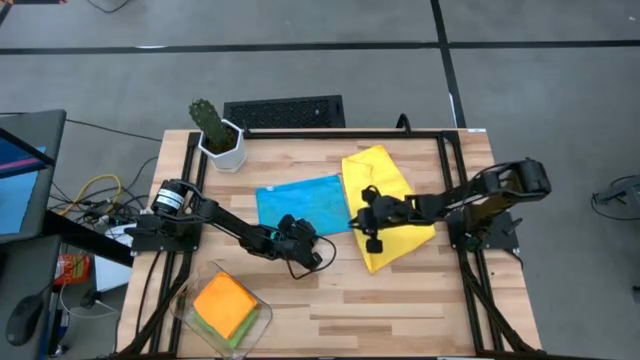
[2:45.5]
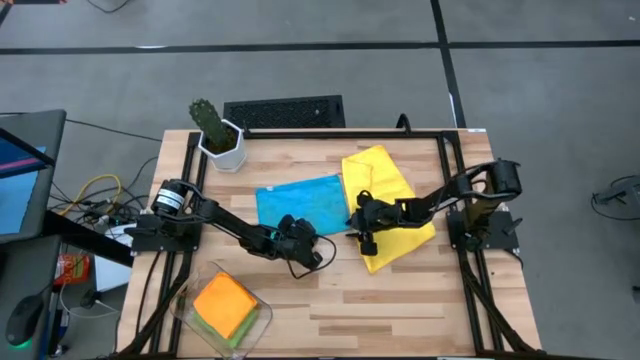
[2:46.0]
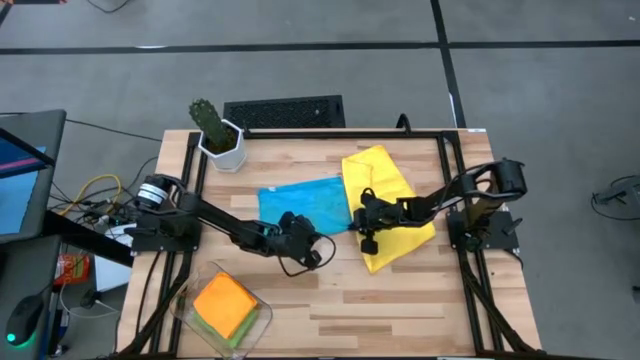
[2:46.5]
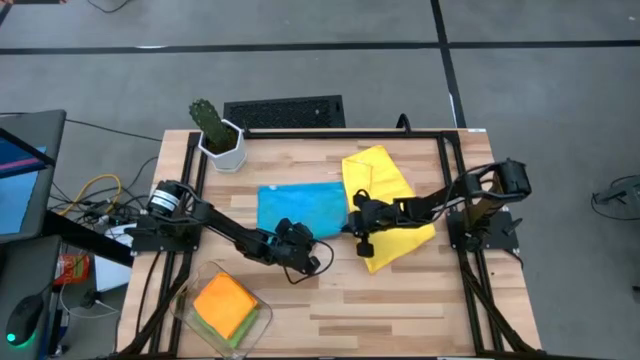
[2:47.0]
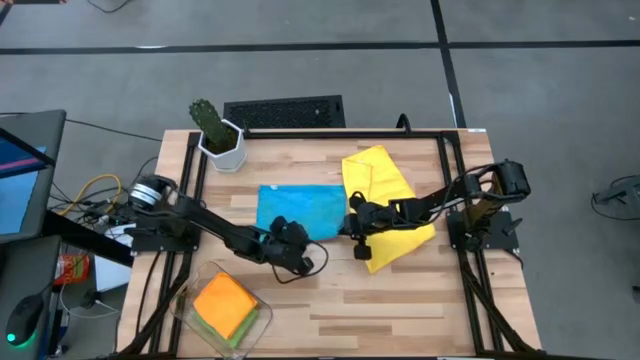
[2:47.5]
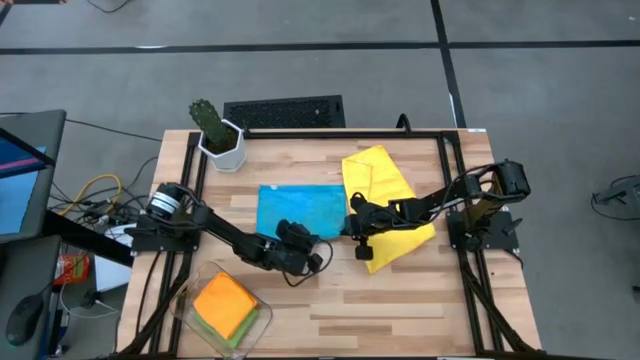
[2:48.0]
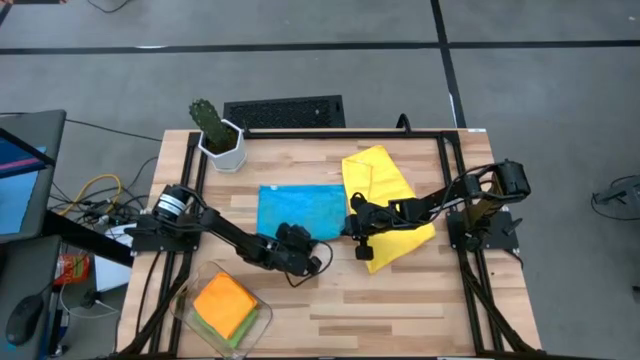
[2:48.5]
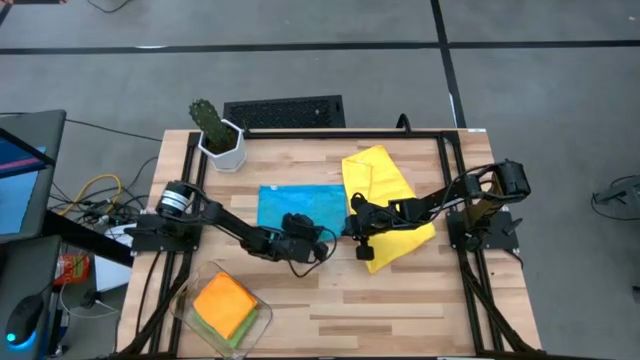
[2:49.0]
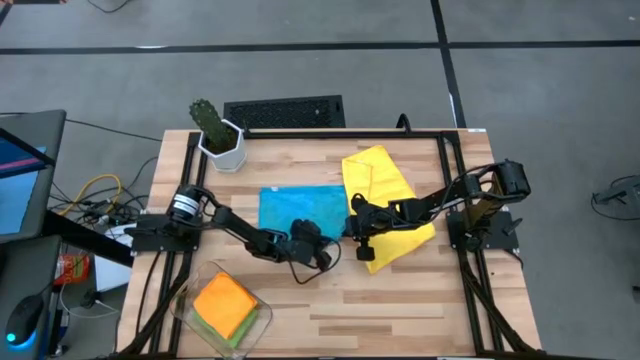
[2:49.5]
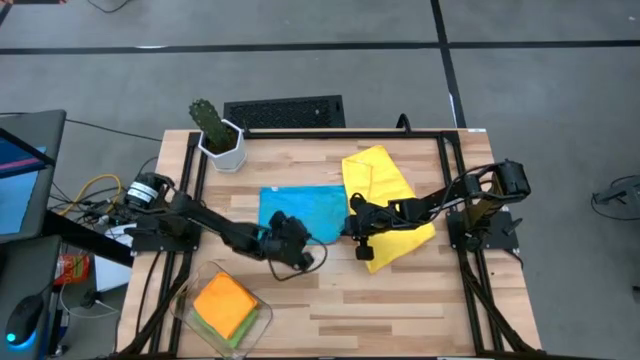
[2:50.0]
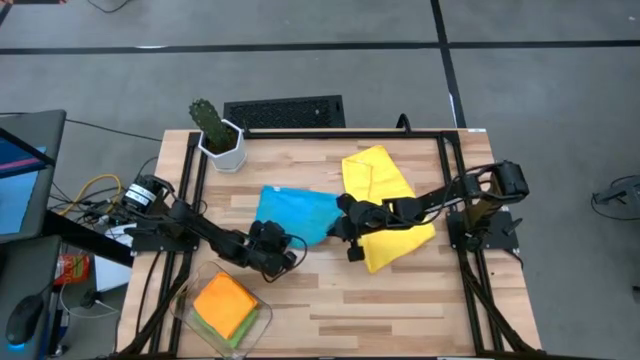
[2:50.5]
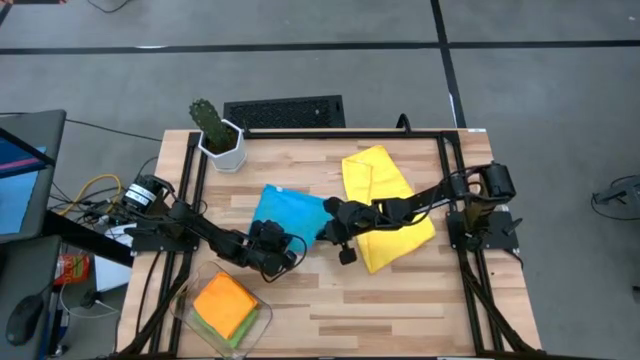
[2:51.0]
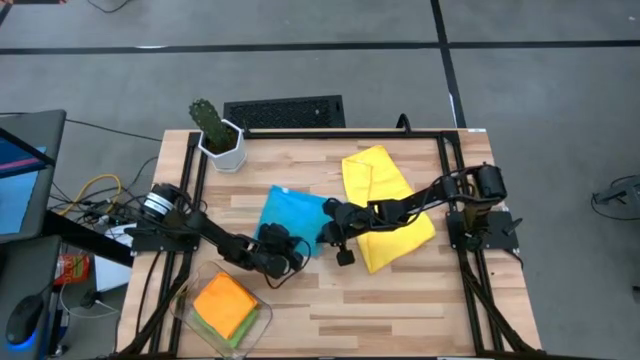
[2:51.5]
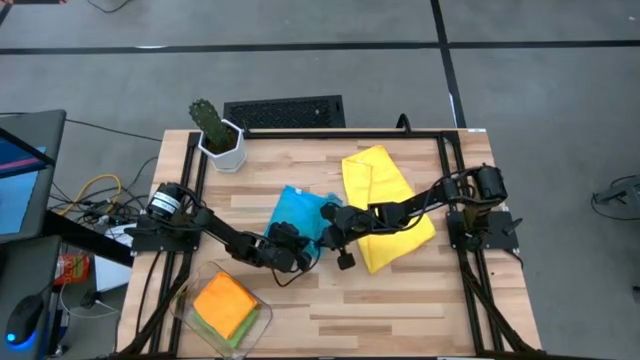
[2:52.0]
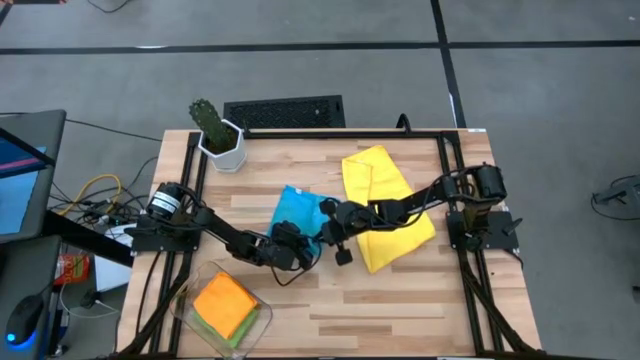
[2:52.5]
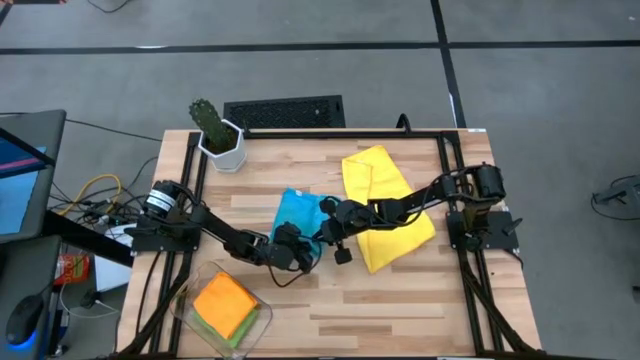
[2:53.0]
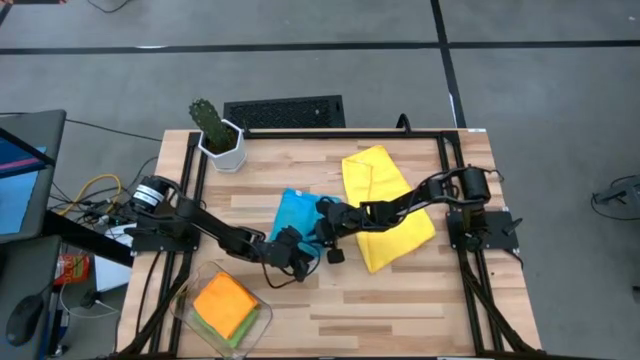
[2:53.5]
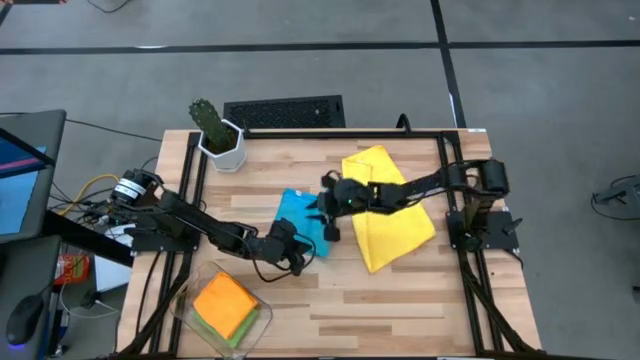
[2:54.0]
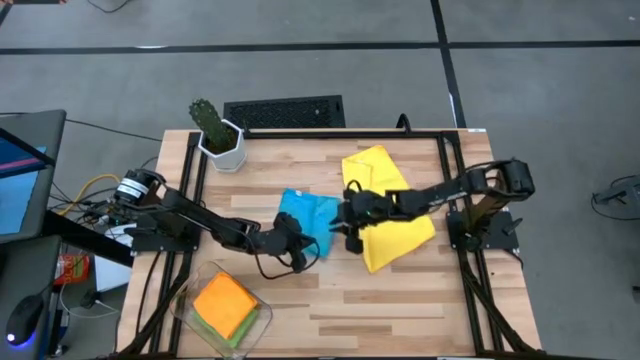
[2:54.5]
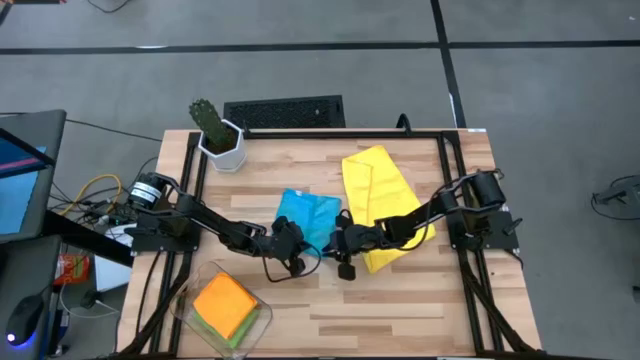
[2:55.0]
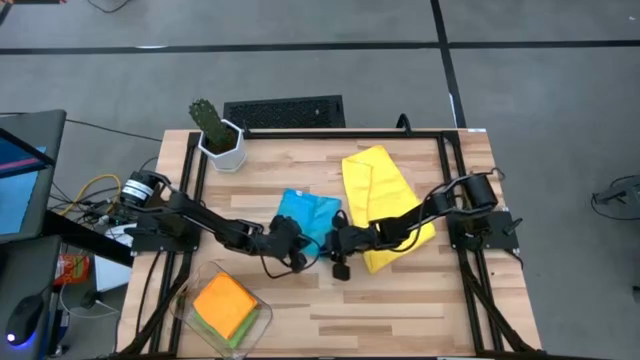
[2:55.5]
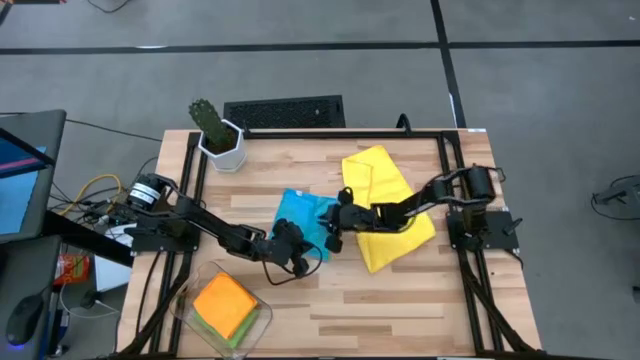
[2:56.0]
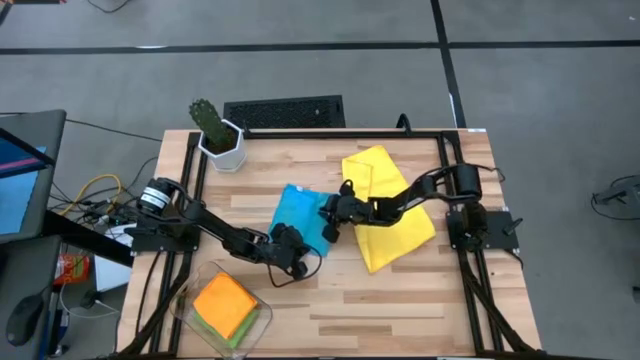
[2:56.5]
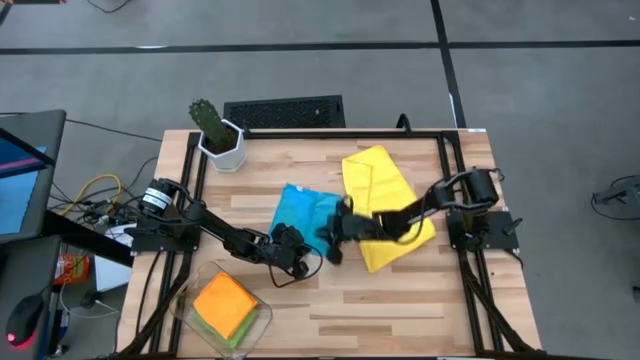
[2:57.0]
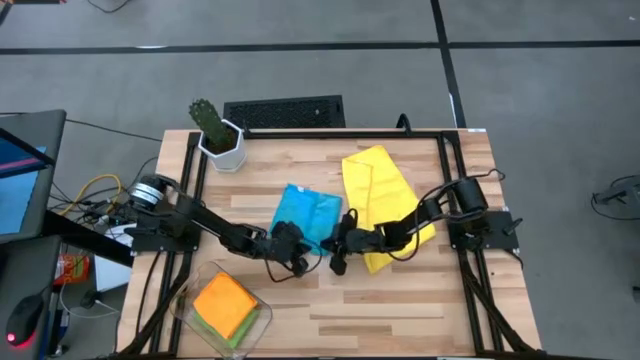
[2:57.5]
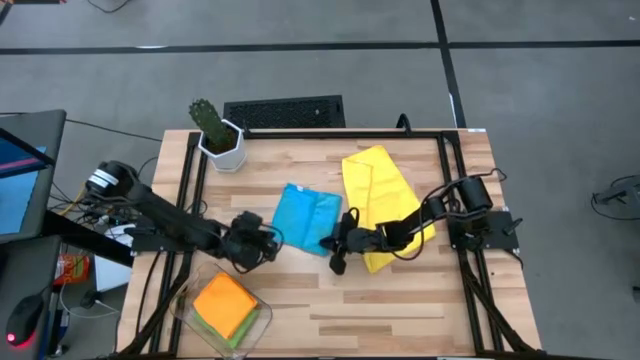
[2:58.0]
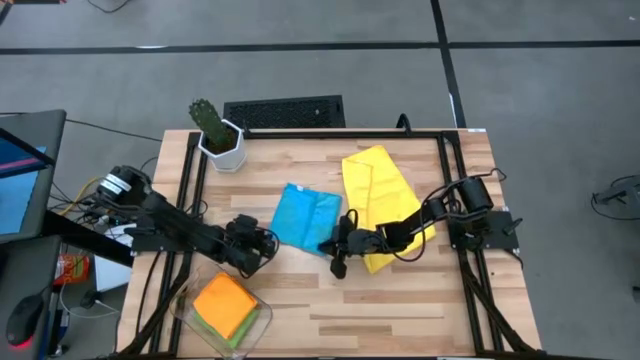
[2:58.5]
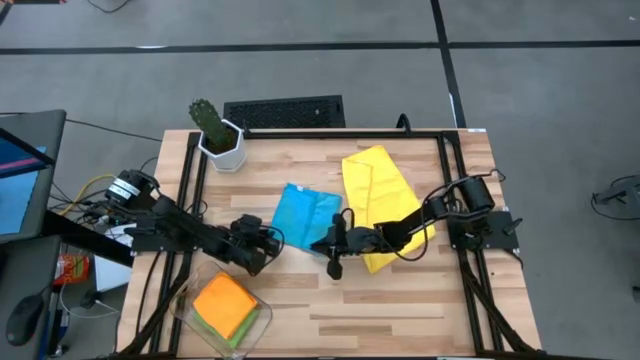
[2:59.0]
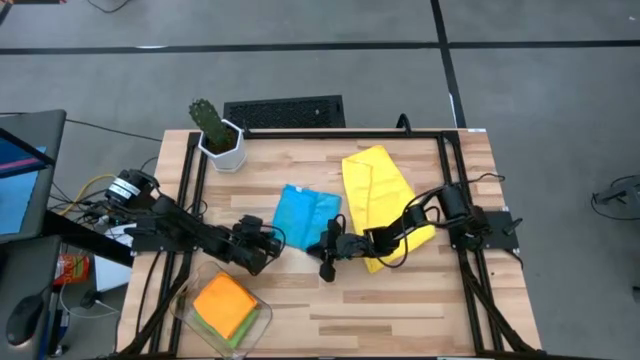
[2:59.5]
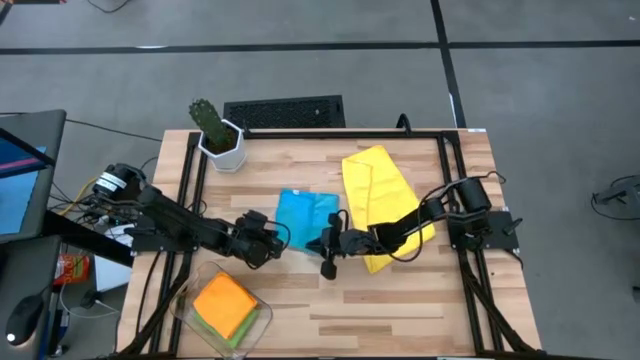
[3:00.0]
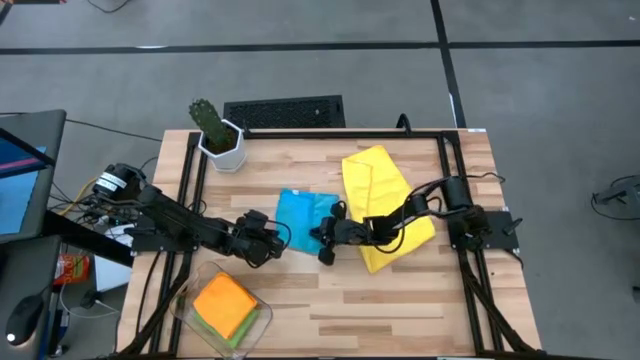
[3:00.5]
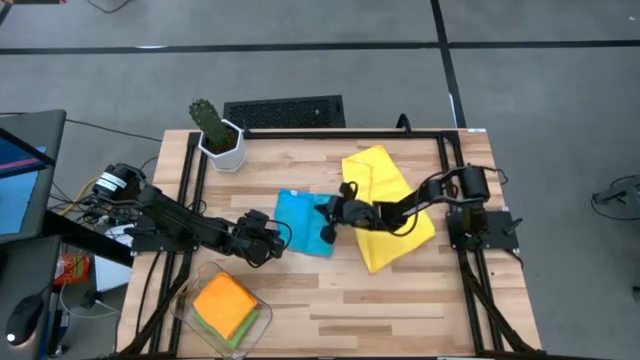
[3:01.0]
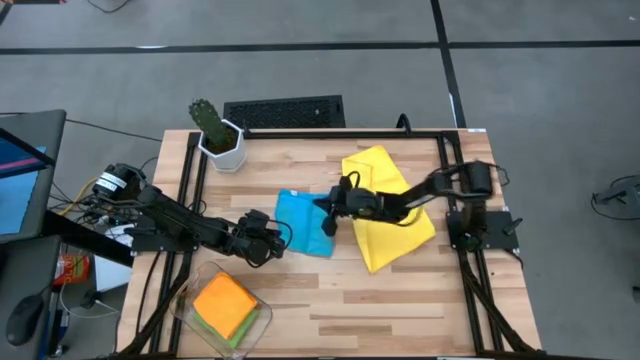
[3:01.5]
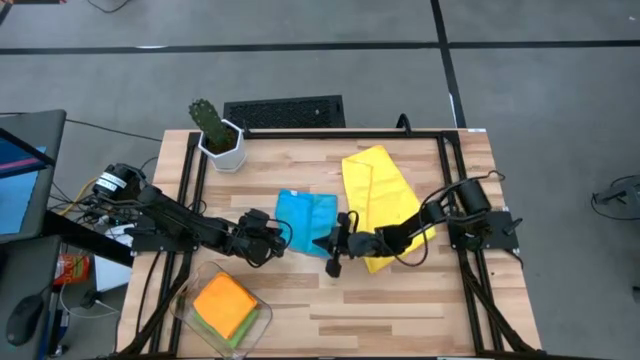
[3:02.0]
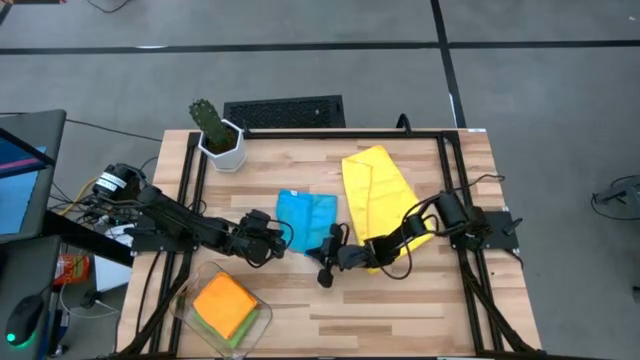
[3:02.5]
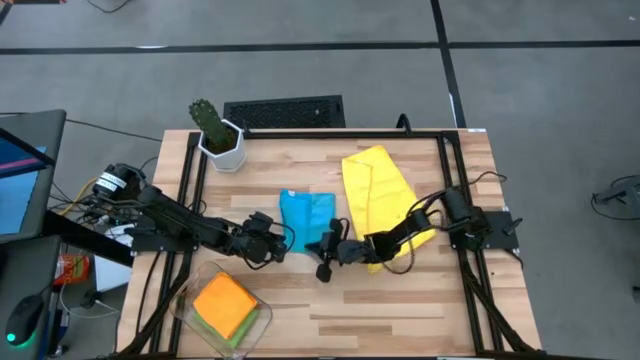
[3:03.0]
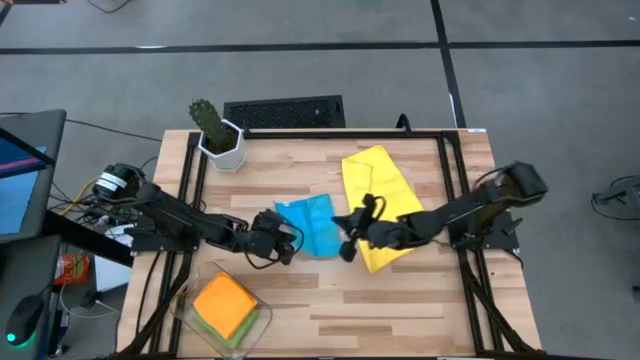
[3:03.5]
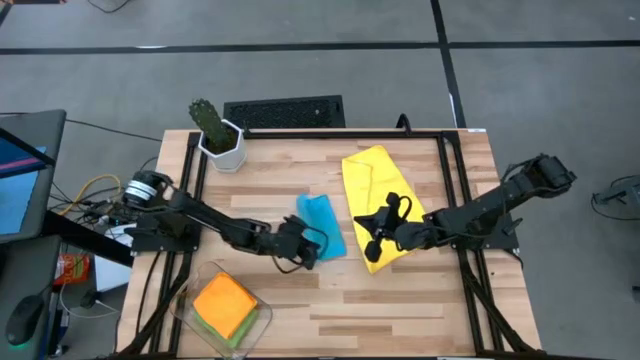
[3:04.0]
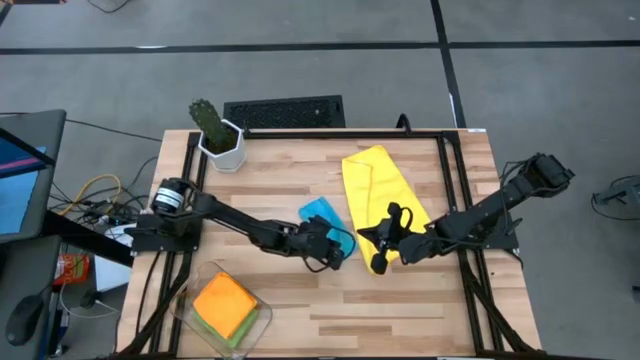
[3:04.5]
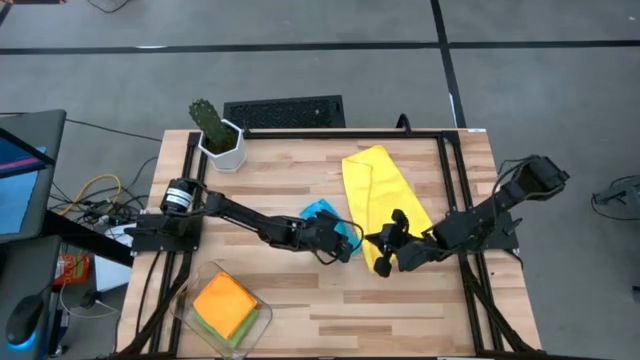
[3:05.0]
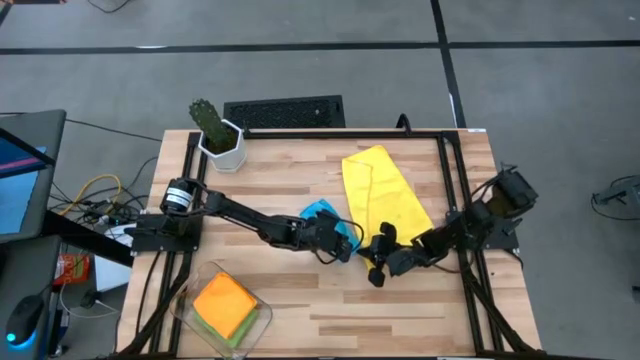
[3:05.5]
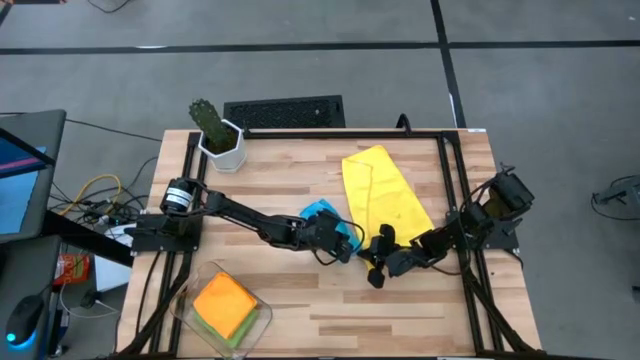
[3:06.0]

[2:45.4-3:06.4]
Task: Fold microfiber towels
Fold the blue microfiber towel
